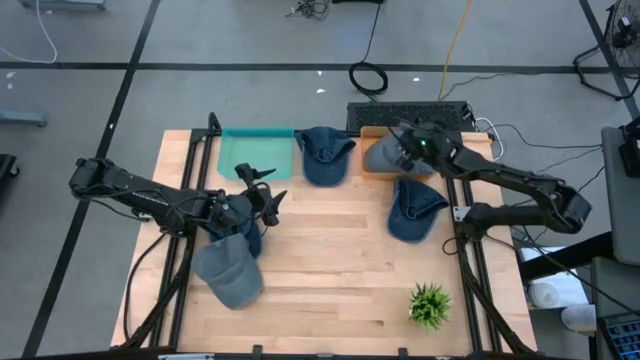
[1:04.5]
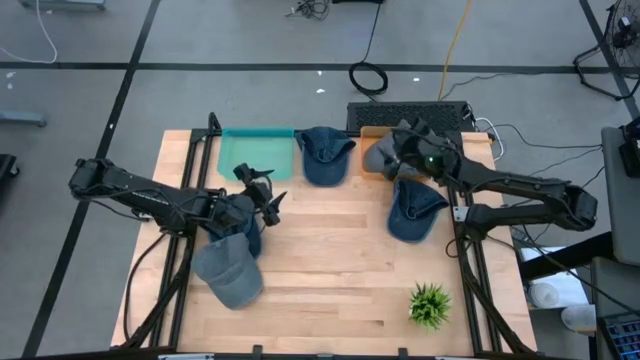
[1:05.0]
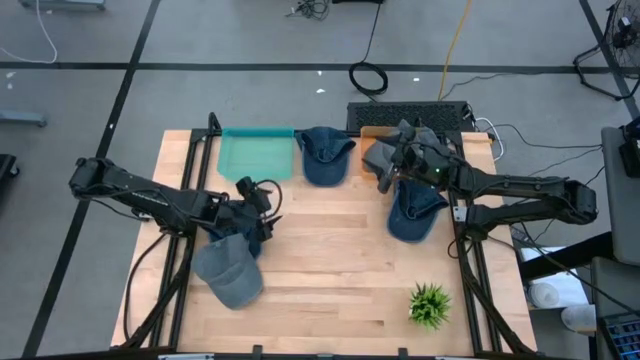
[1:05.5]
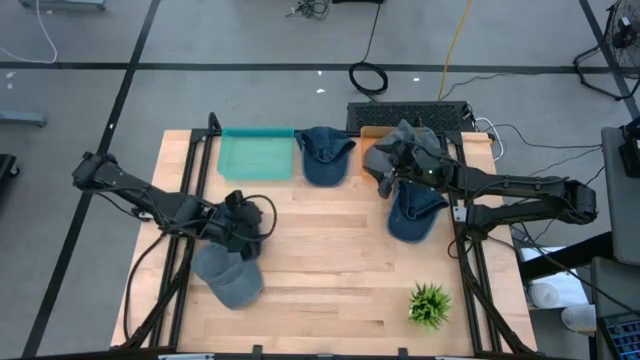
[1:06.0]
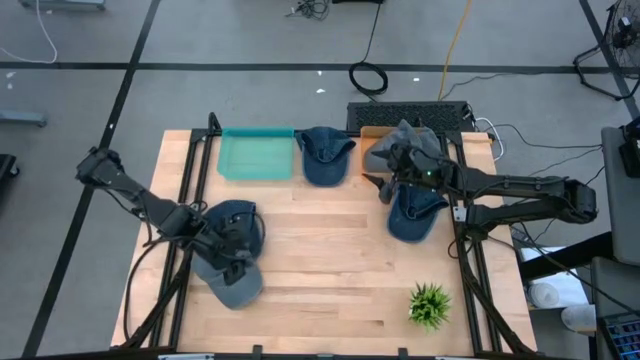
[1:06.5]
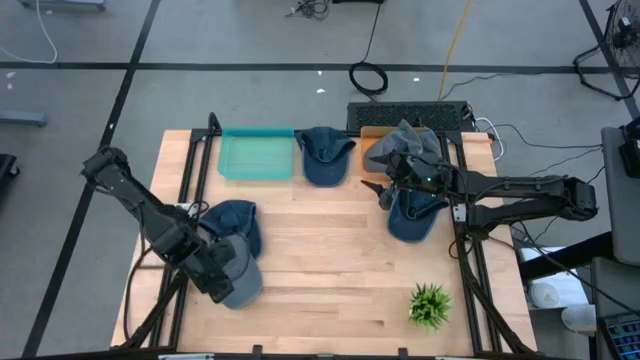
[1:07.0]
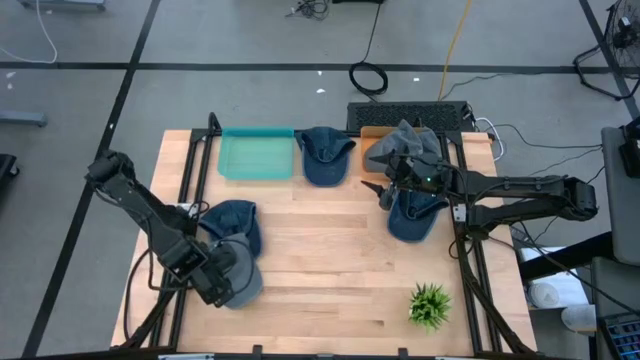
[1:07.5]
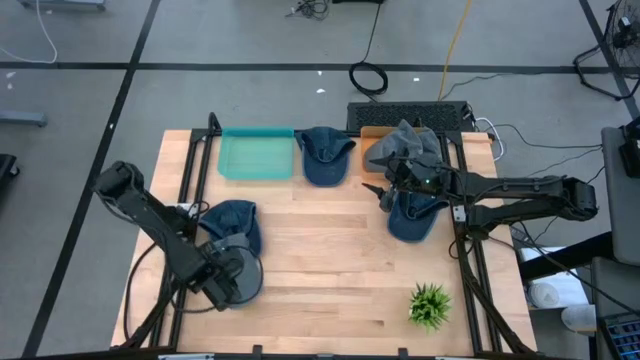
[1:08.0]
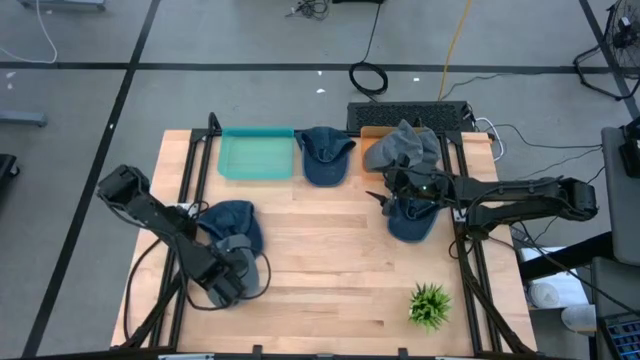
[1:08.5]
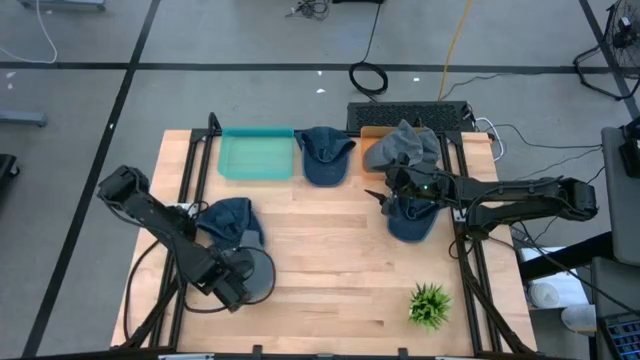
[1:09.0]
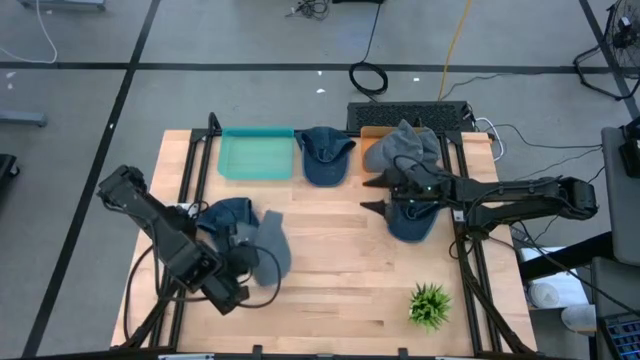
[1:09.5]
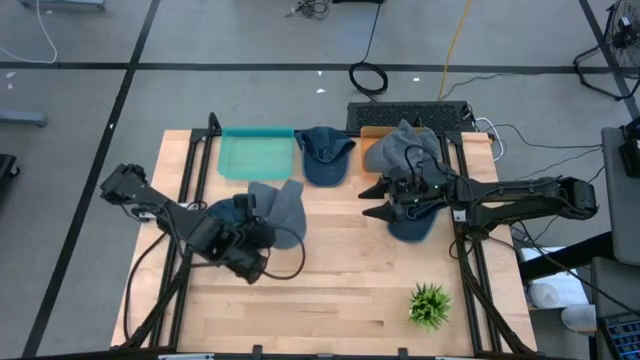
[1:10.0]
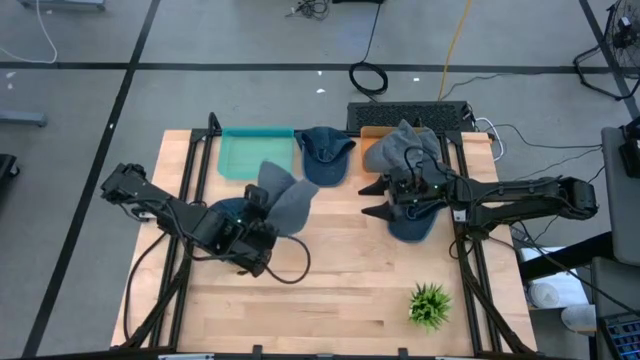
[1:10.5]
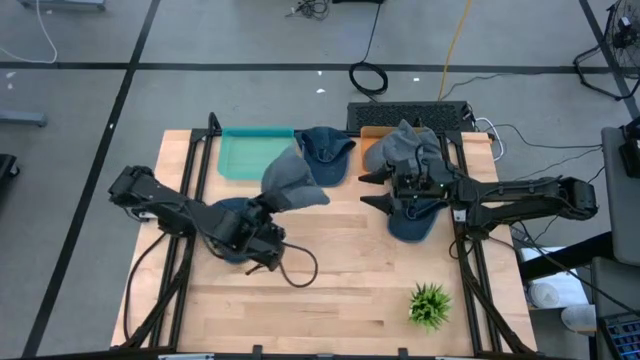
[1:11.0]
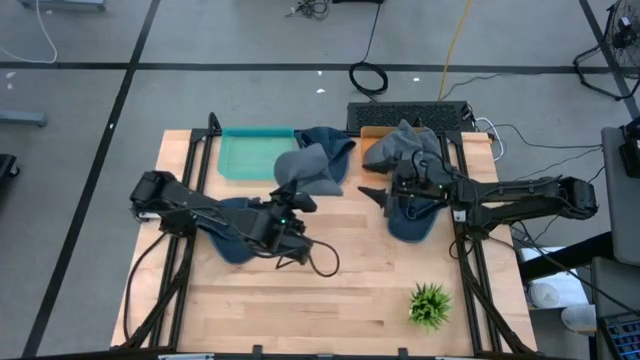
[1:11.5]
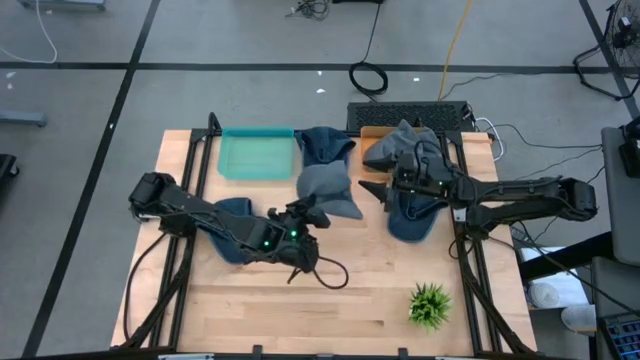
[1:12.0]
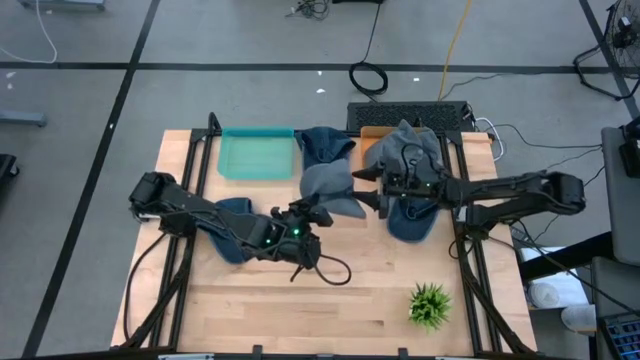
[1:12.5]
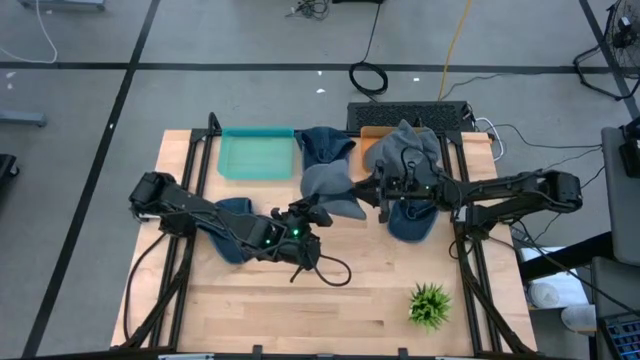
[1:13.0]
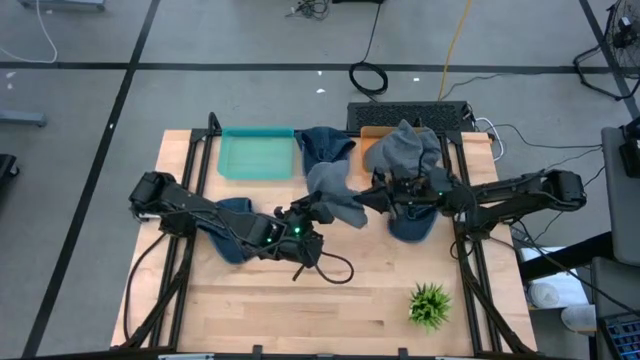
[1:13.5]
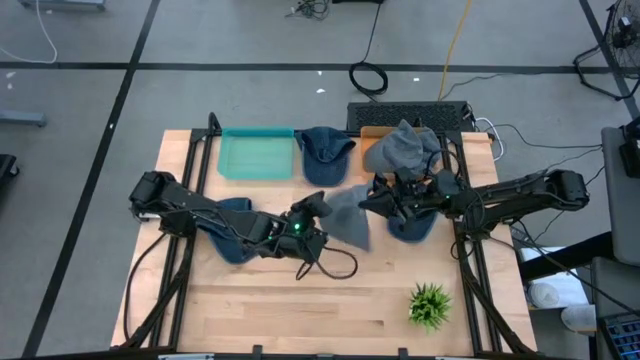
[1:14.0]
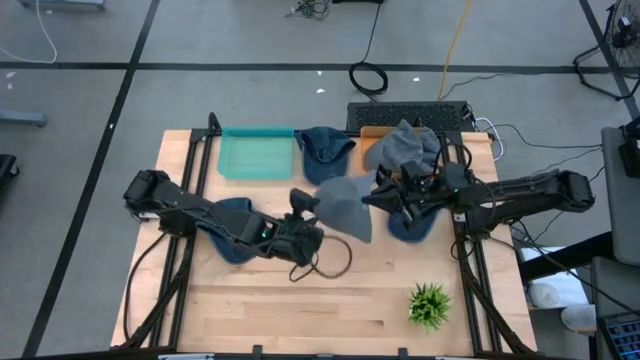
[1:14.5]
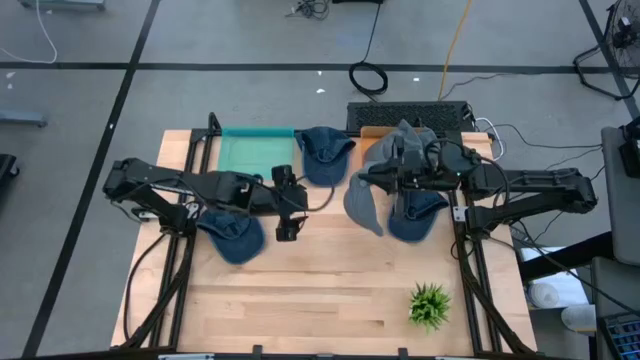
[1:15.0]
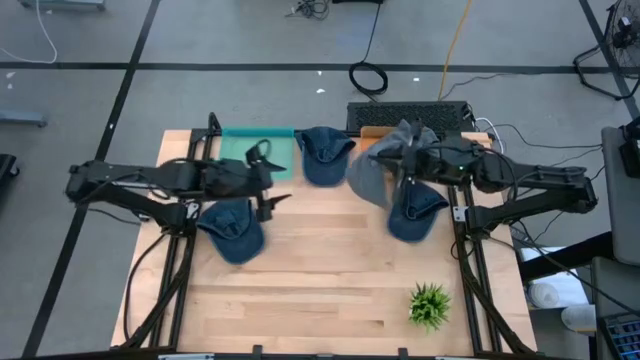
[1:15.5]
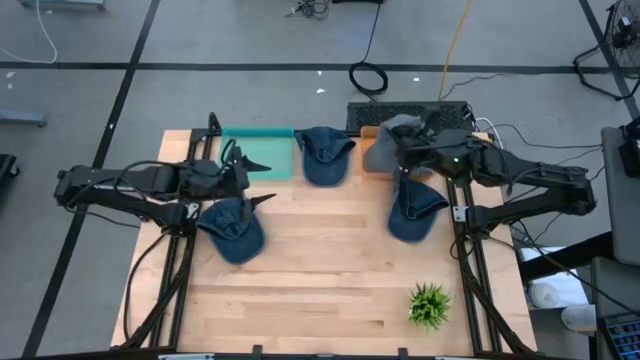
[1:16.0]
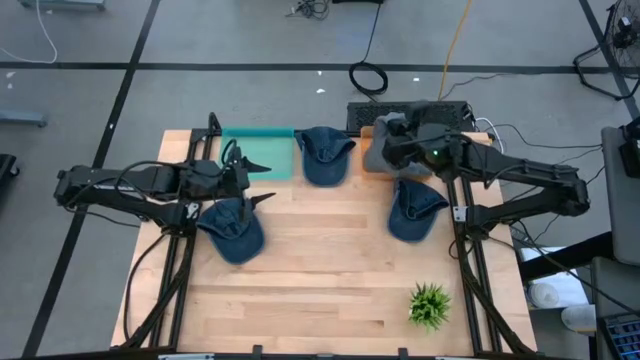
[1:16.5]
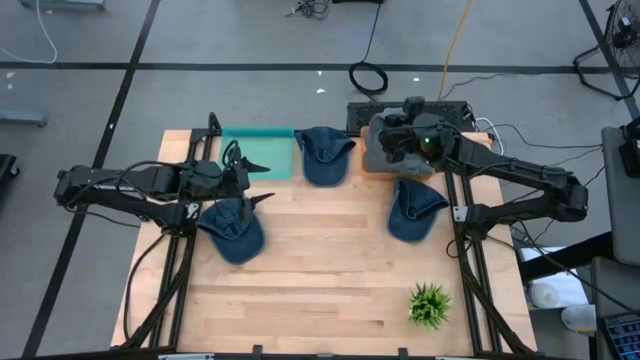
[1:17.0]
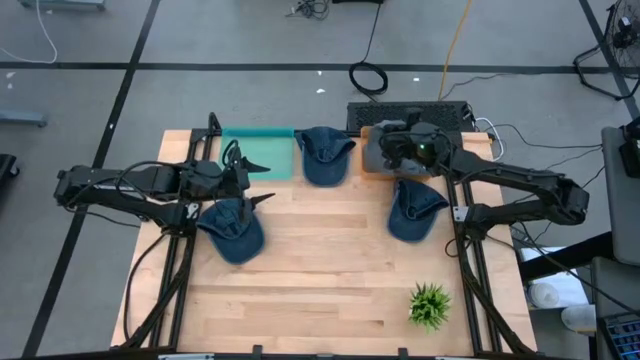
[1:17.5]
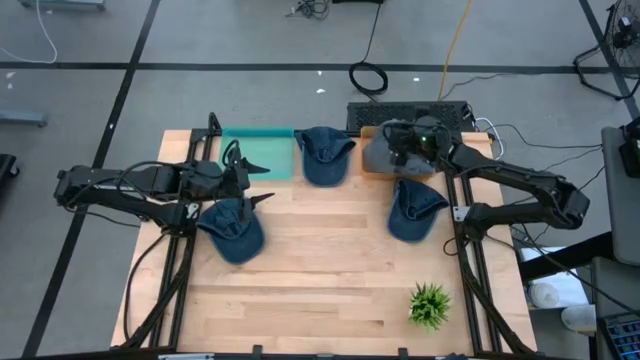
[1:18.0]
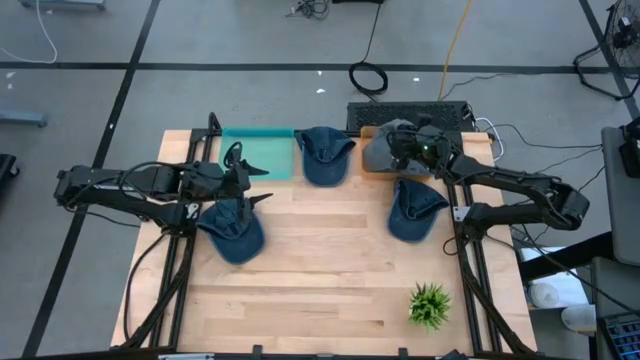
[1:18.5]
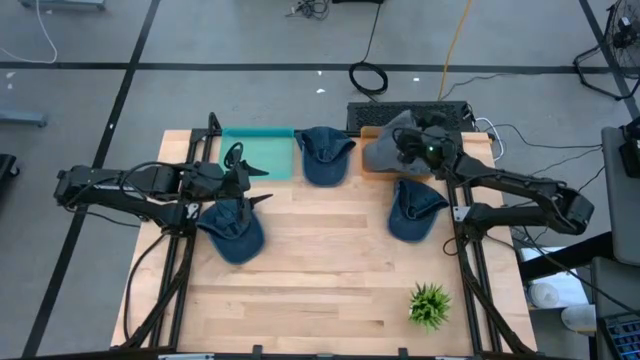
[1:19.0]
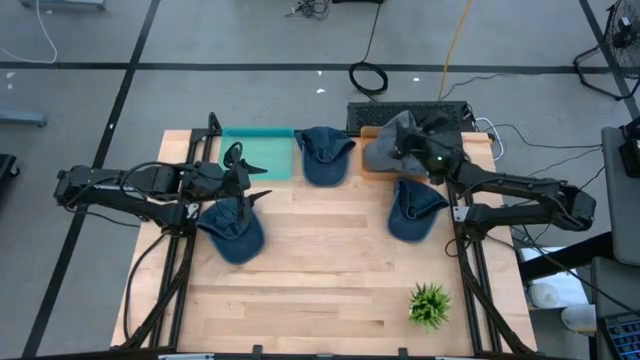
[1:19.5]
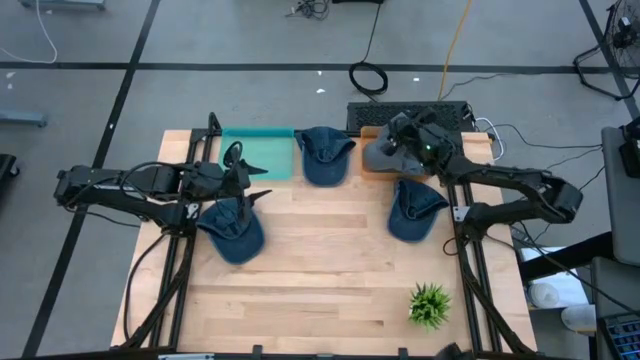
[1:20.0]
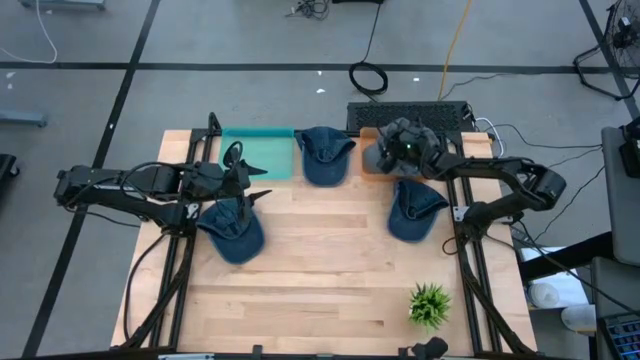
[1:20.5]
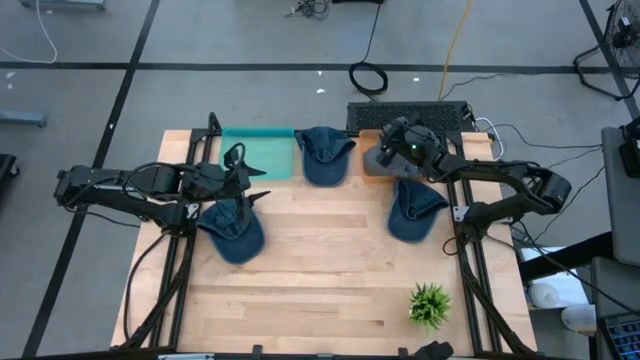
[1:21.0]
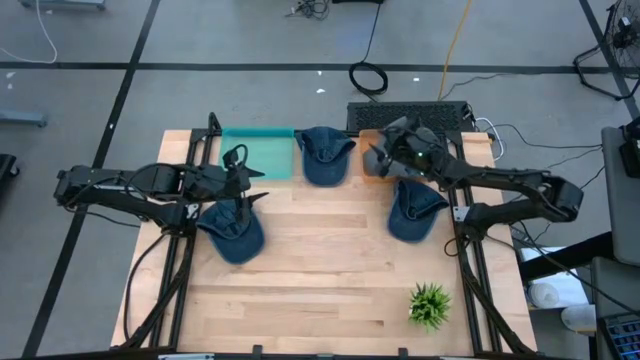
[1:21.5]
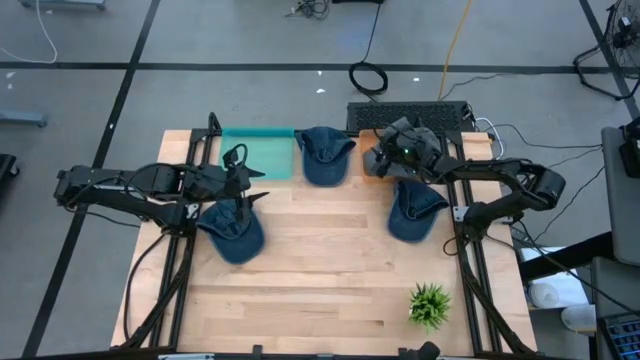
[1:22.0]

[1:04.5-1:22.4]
Task: Pick & Place hat
Put the gray cap into the orange bin

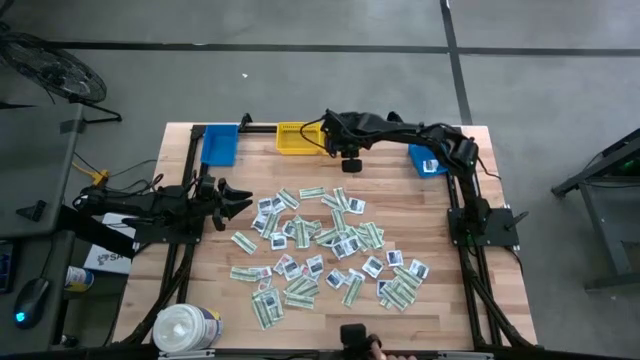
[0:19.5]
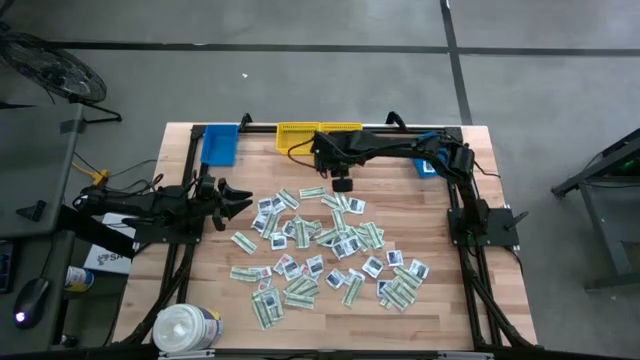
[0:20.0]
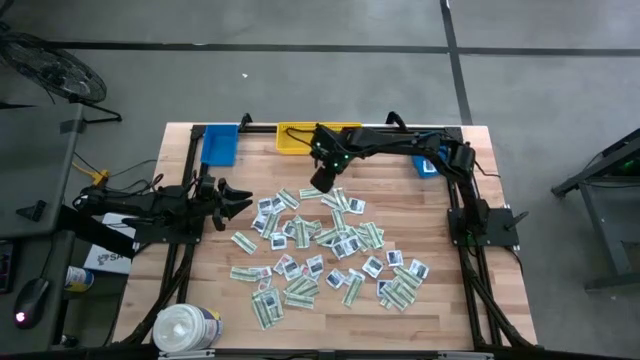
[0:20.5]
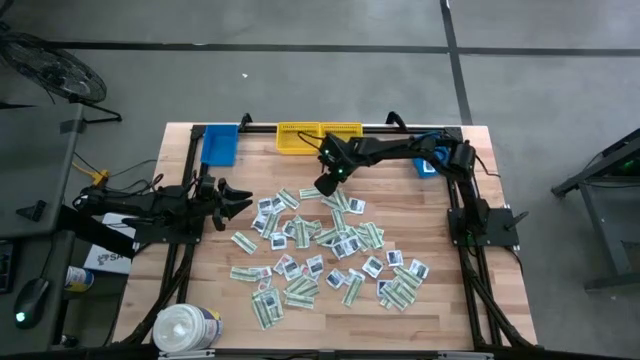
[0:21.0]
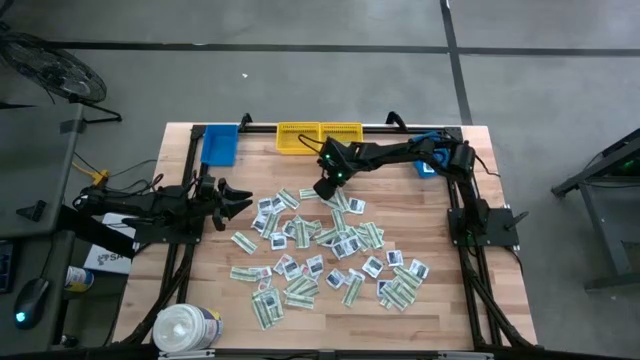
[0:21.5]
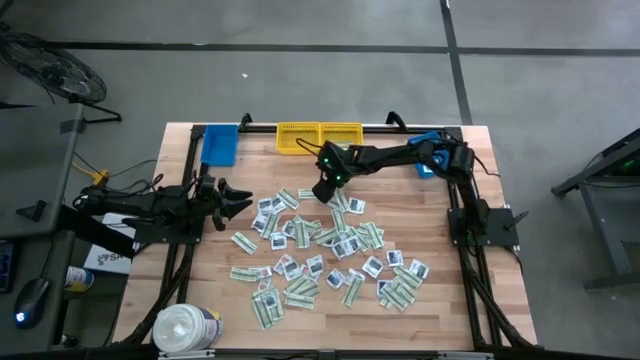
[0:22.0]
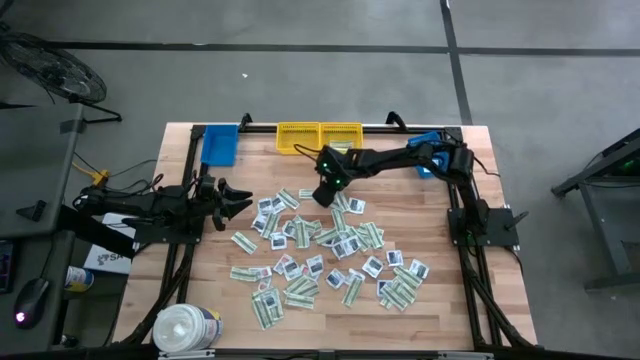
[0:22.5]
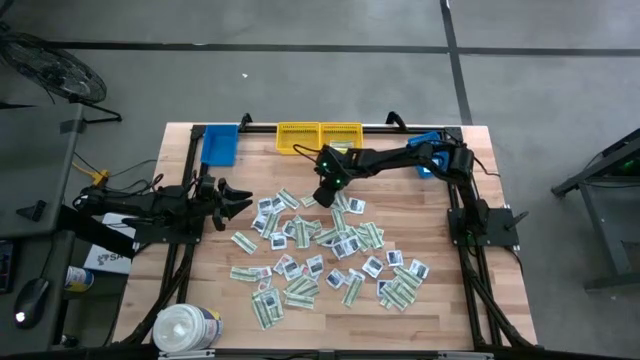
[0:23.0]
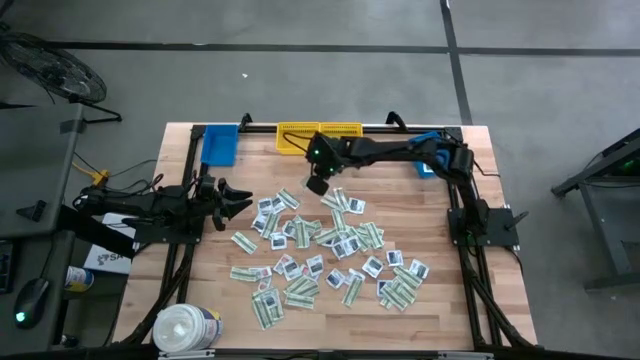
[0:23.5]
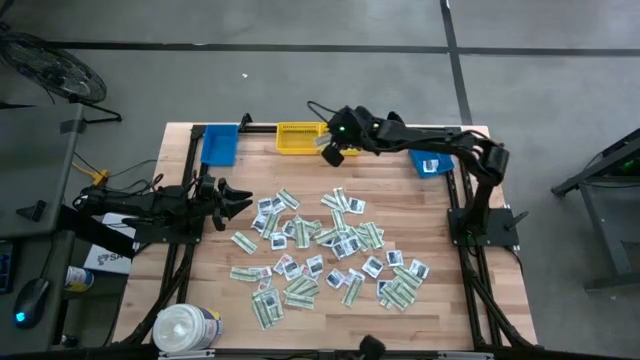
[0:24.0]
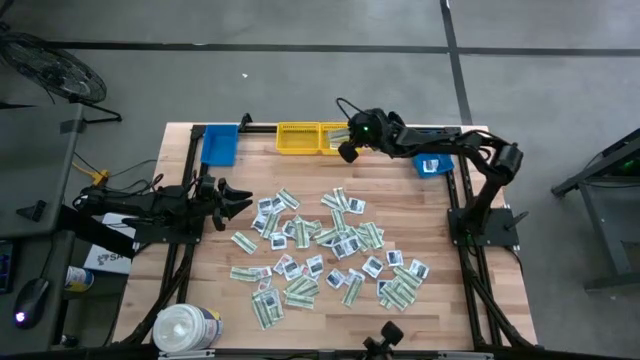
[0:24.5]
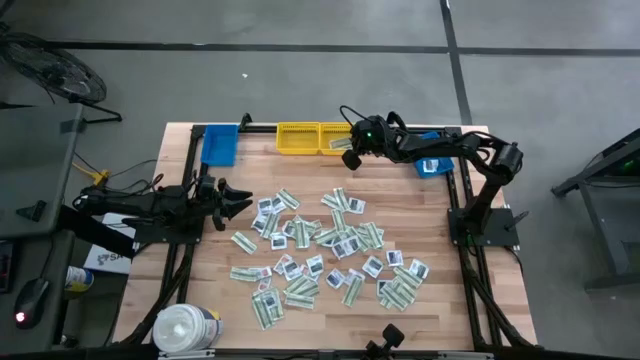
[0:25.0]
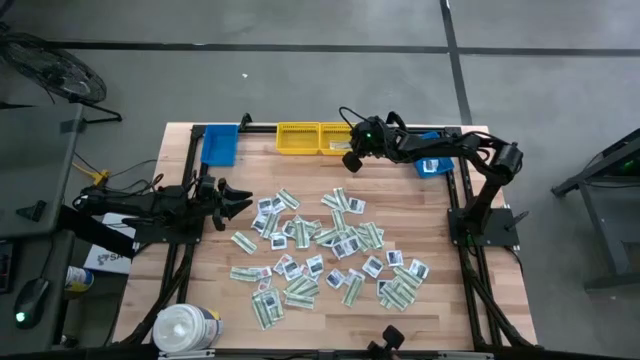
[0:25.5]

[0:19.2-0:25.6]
Task: Pick & Place First Aid Supplies
Put the green bandage pack into the right yellow bin
